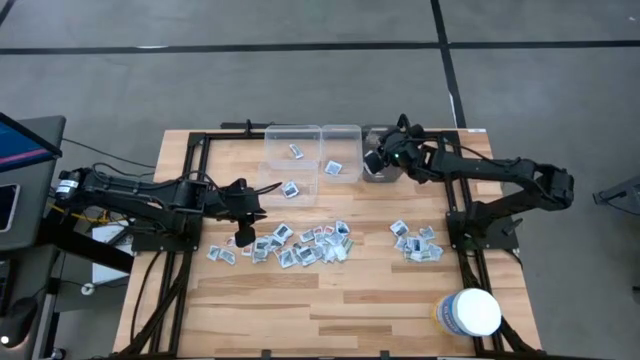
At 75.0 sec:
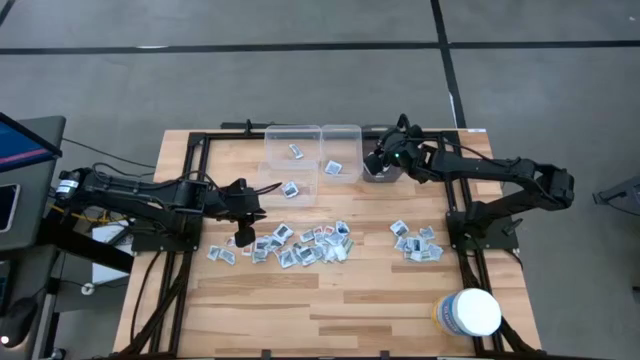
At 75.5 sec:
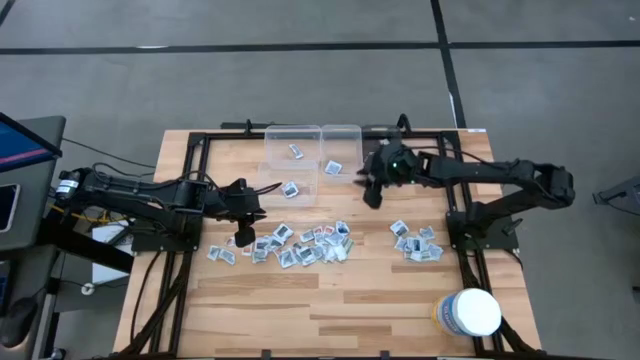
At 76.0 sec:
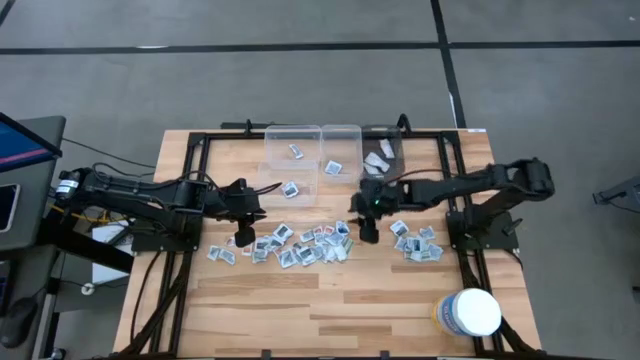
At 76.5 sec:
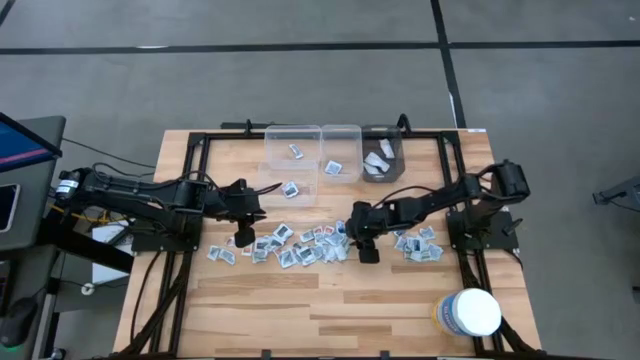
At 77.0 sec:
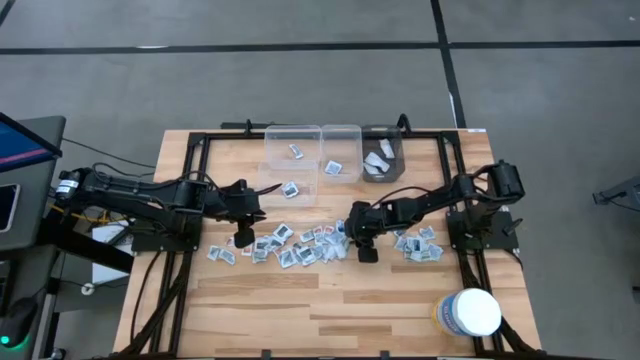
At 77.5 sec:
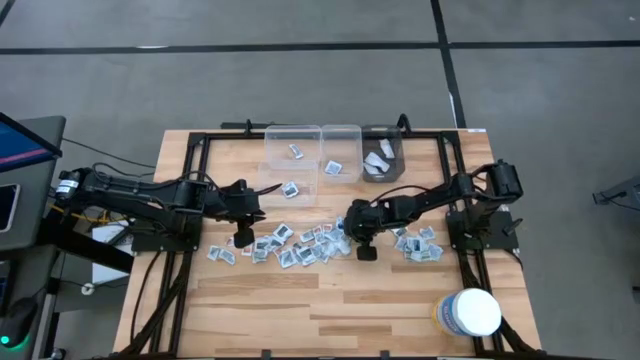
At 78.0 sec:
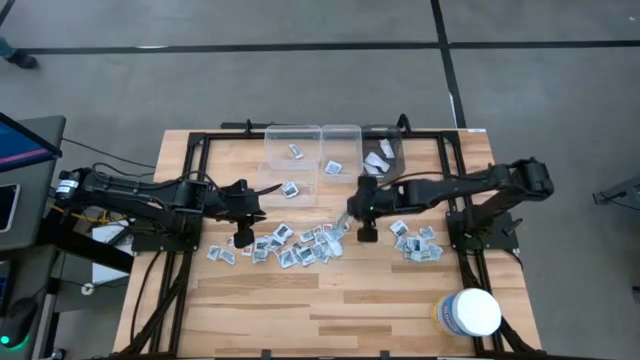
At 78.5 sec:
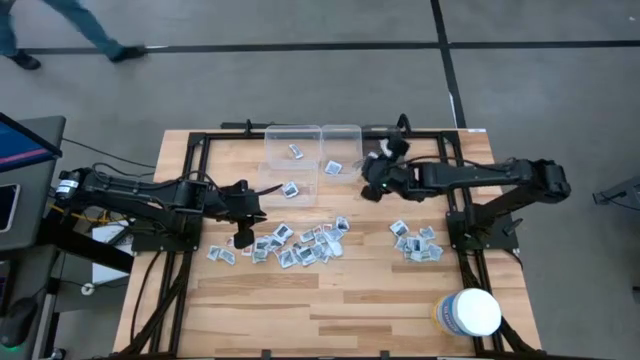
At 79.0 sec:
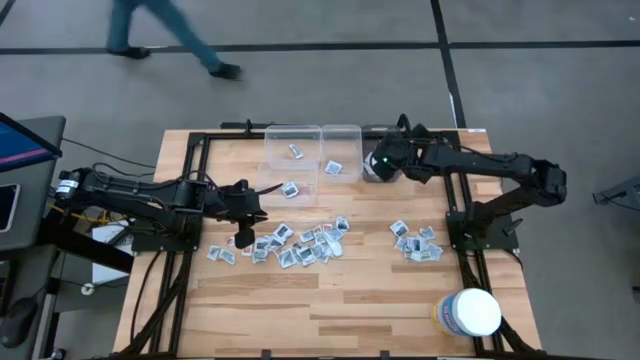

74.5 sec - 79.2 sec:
Task: Pick & Place First Aid Supplies
Put the bandage pack into the black transparent bin

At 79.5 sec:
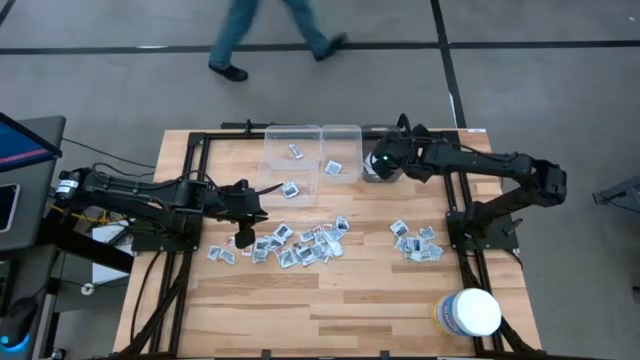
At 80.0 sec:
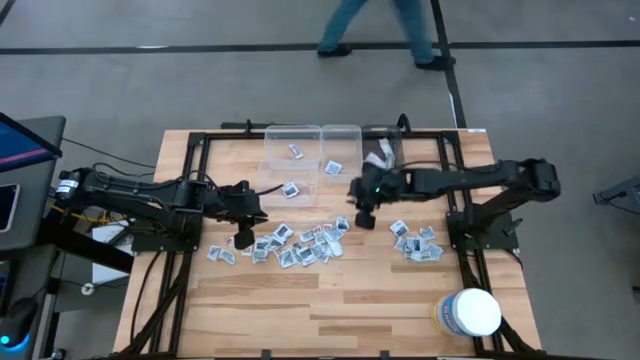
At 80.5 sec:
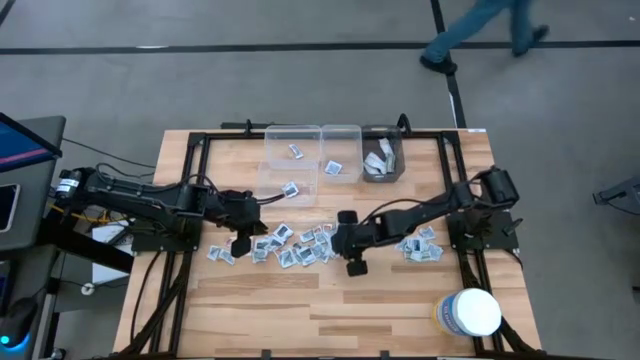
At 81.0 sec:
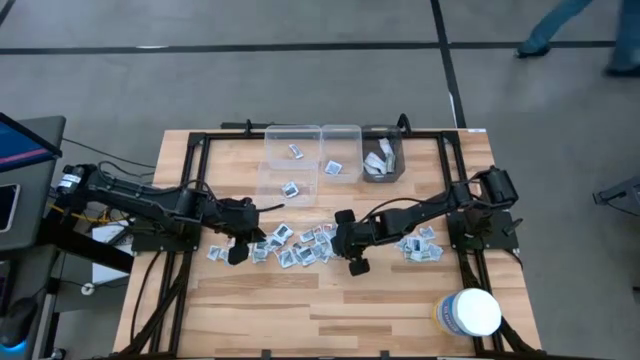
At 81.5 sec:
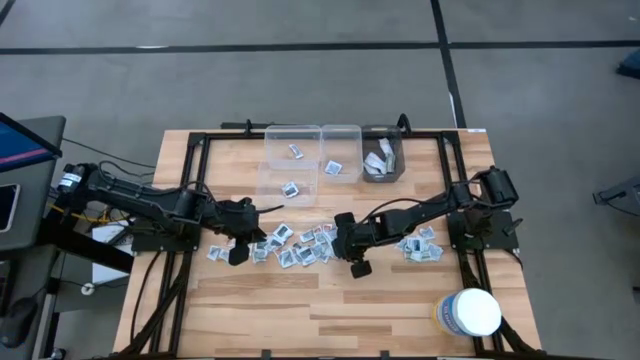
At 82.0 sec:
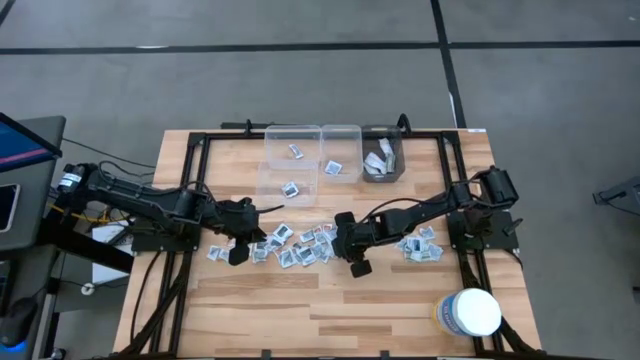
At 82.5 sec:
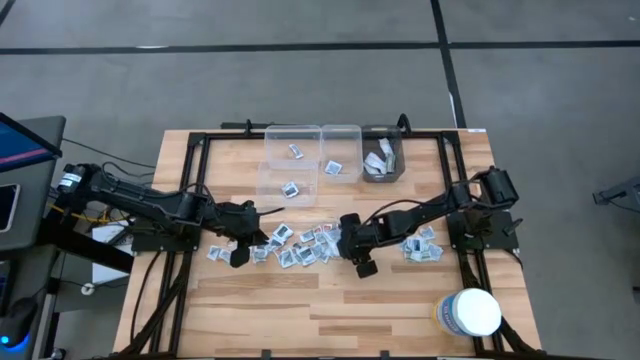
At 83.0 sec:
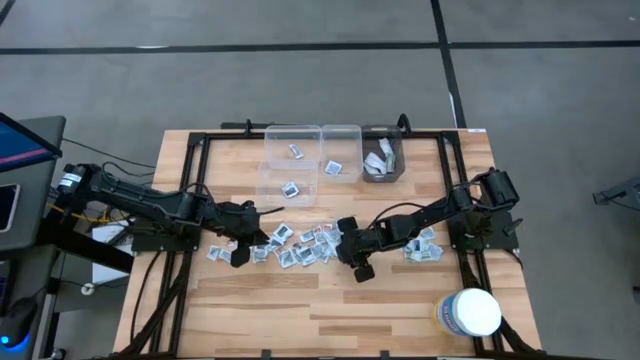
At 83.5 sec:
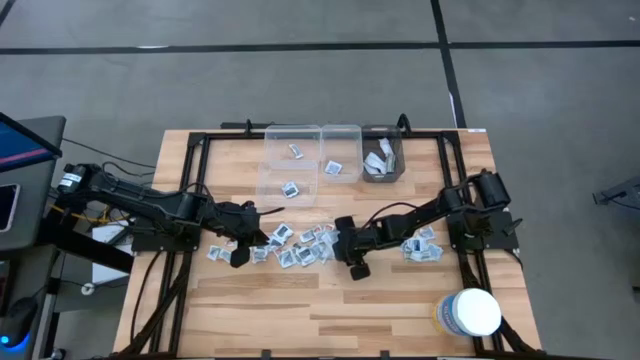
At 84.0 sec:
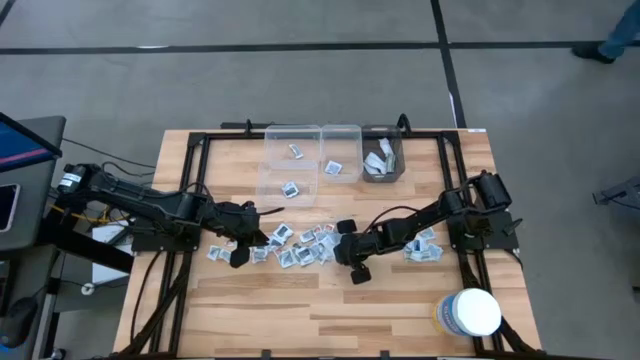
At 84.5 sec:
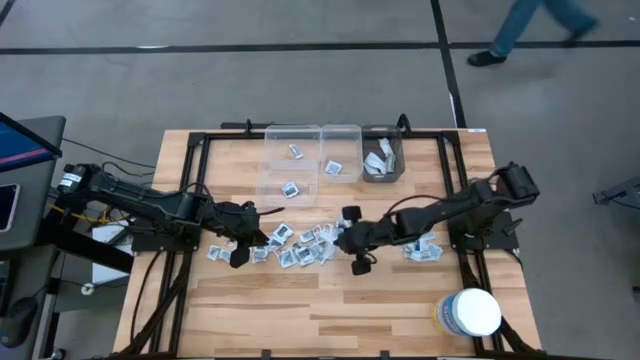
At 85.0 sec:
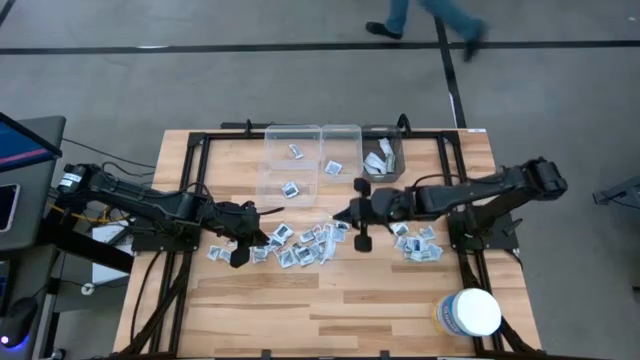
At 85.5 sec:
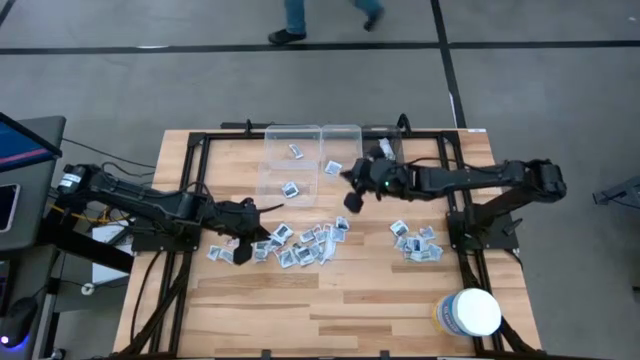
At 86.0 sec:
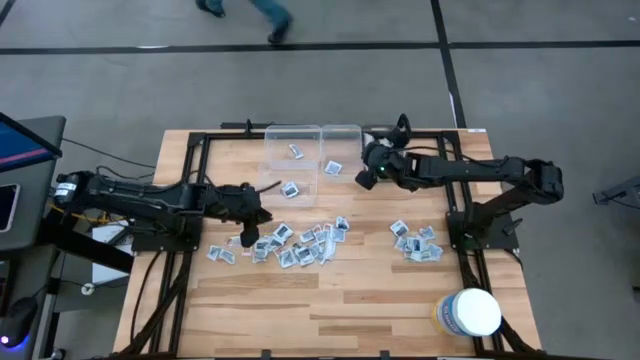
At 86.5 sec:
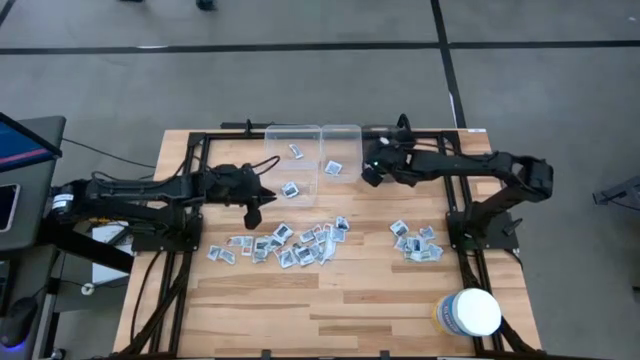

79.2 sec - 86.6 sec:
Put the bandage pack into the black transparent bin

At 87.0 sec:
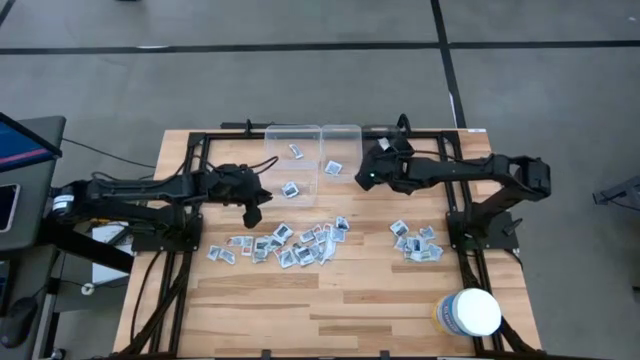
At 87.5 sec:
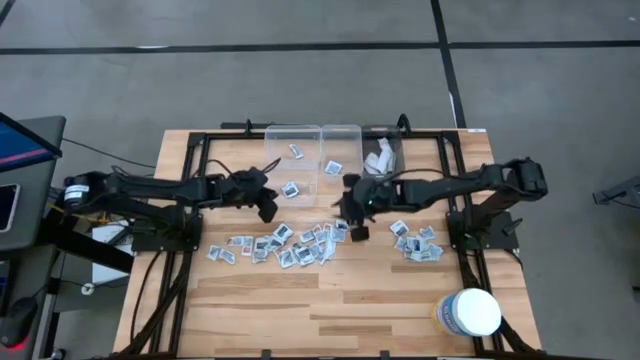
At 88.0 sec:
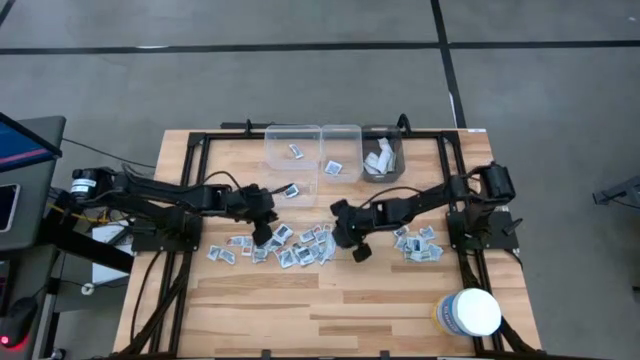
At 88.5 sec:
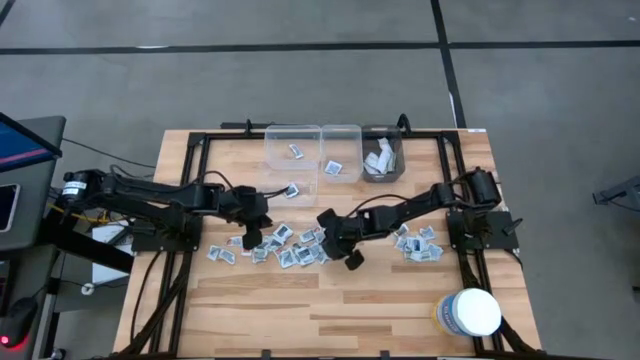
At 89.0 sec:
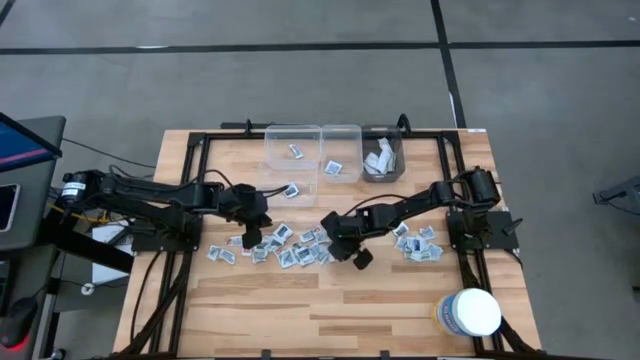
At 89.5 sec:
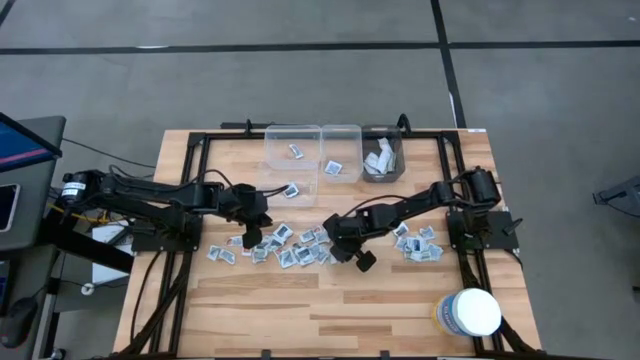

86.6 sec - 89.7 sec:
Put the bandage pack into the black transparent bin

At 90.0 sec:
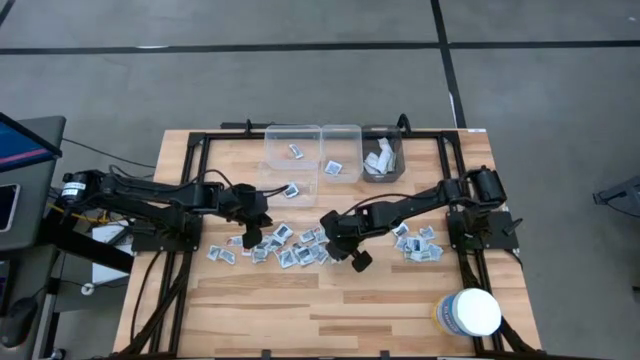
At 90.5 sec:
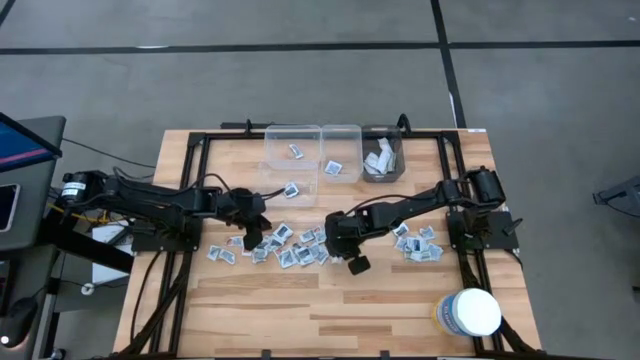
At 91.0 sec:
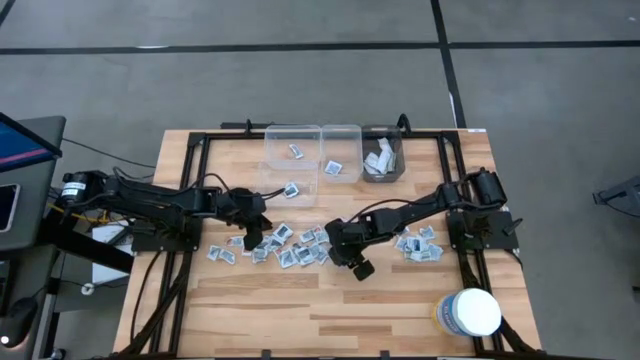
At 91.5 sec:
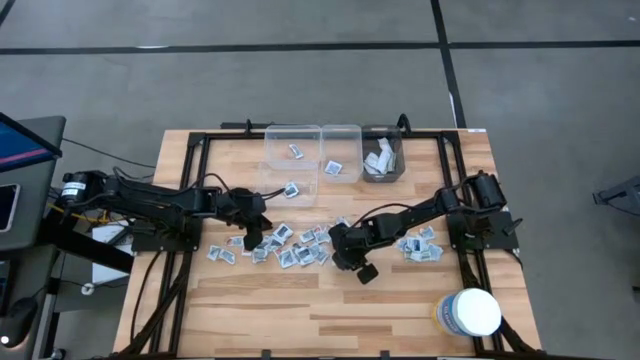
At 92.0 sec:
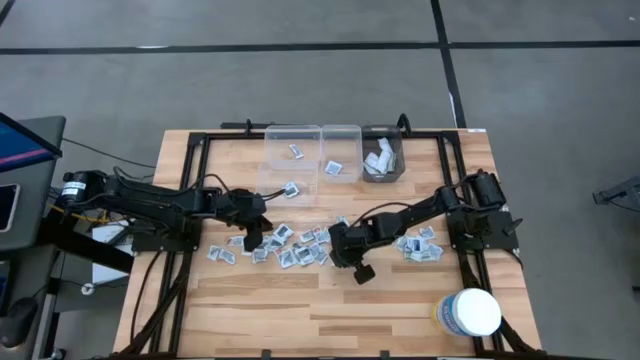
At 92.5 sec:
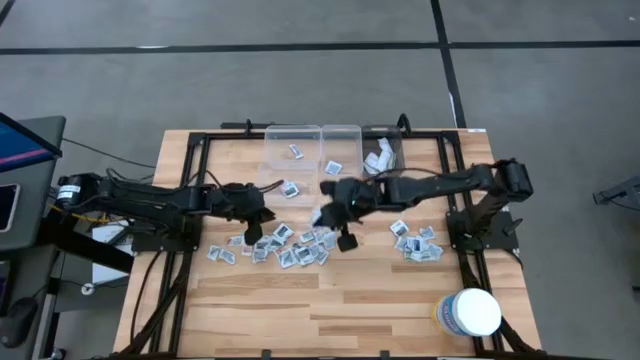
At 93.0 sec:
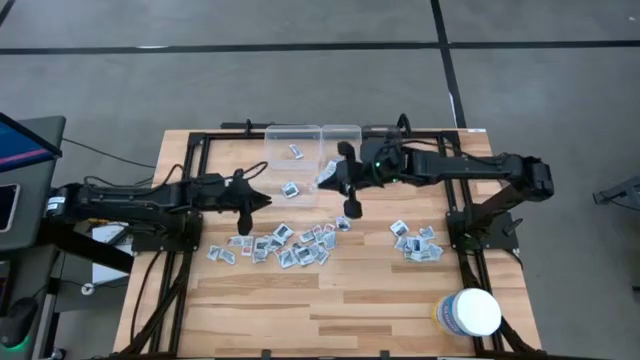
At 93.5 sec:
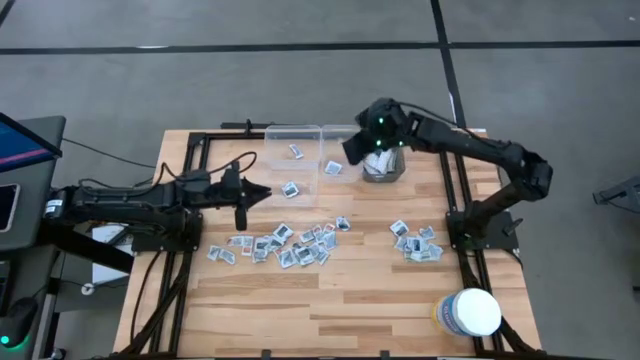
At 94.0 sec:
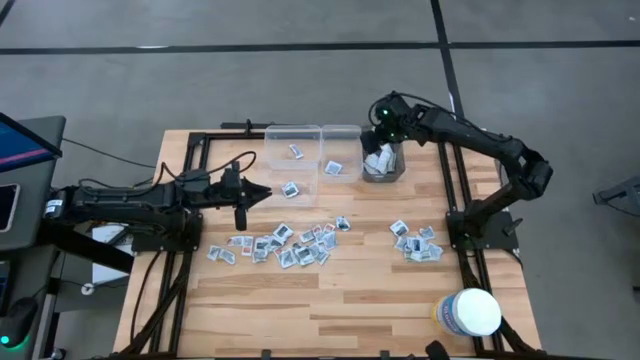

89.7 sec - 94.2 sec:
Put the bandage pack into the black transparent bin

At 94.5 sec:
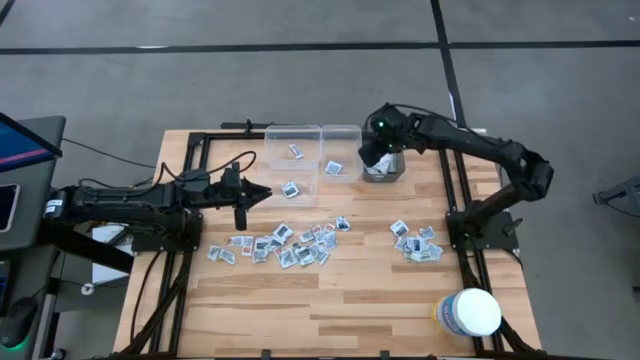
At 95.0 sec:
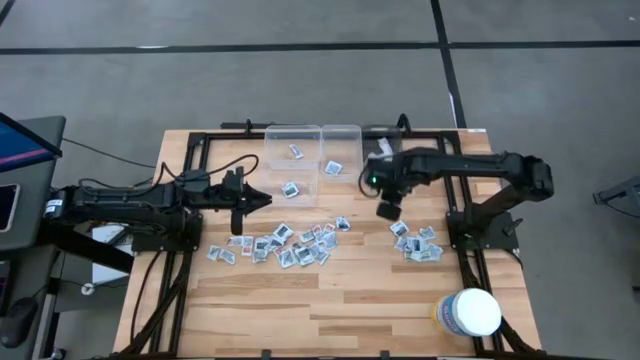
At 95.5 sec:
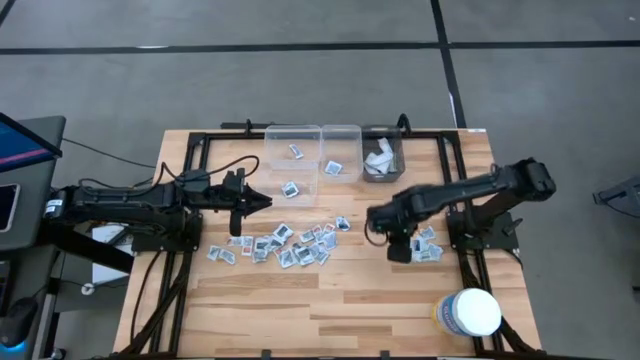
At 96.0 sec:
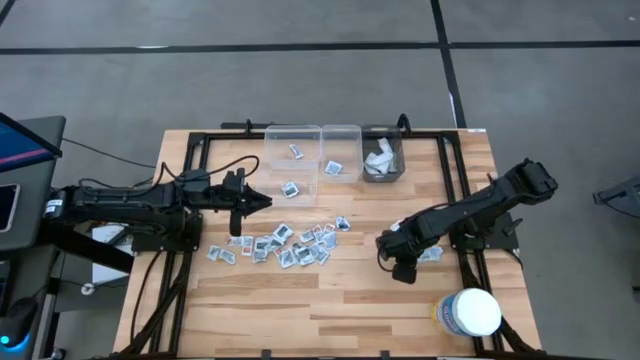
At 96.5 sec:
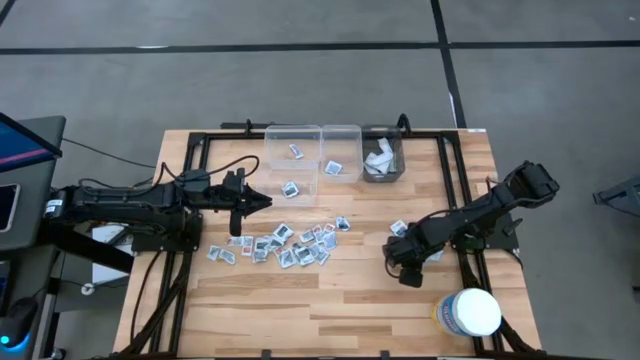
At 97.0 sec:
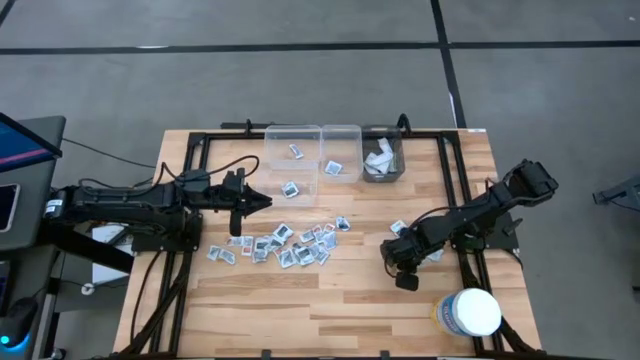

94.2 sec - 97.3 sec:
Put the bandage pack into the black transparent bin
